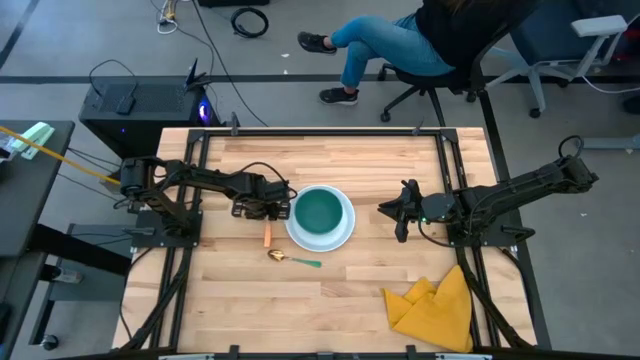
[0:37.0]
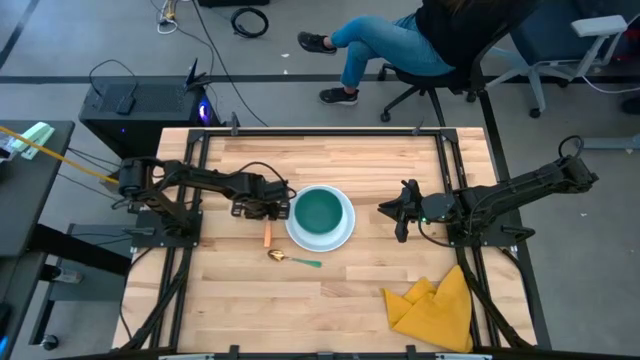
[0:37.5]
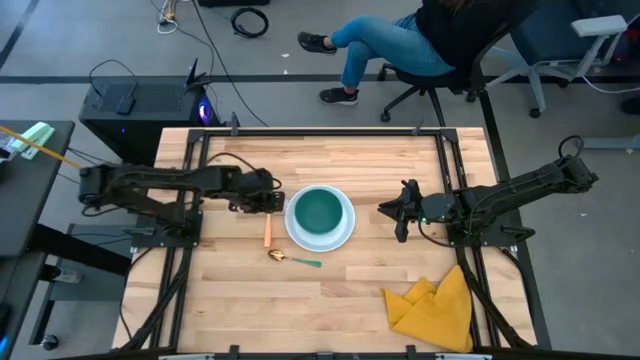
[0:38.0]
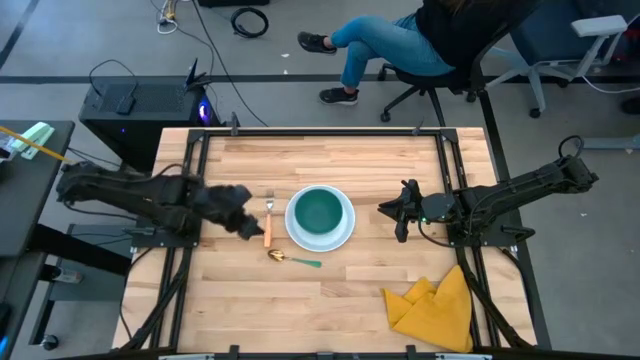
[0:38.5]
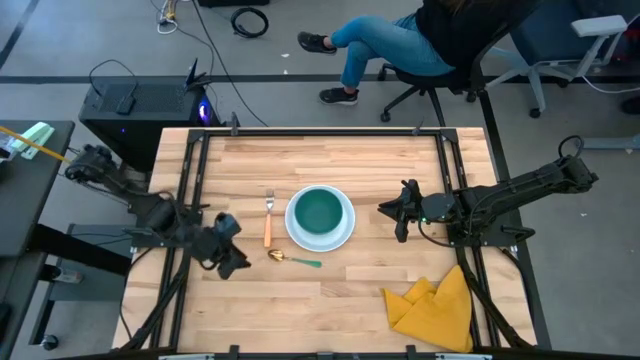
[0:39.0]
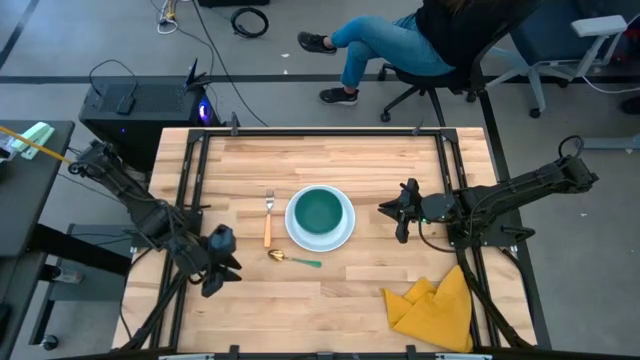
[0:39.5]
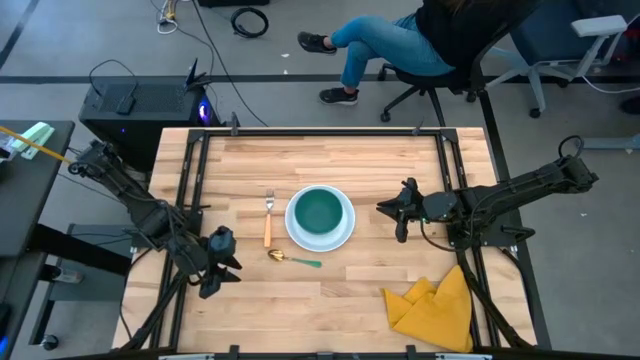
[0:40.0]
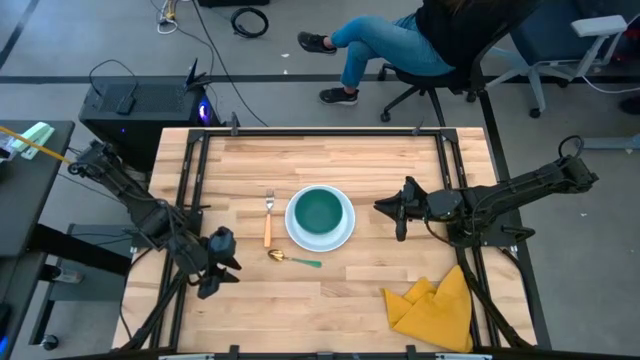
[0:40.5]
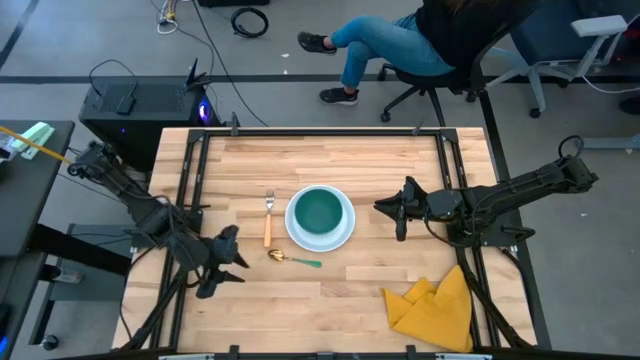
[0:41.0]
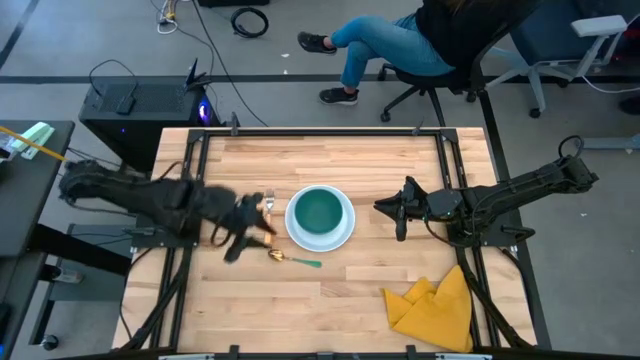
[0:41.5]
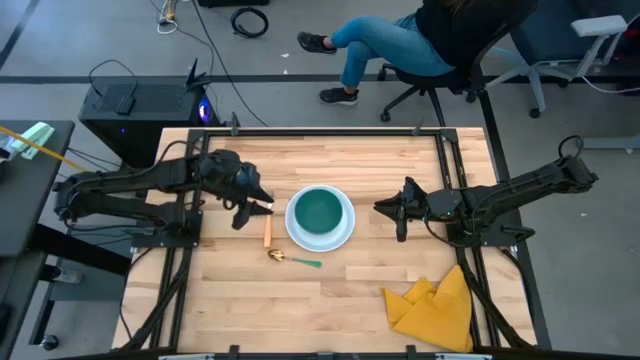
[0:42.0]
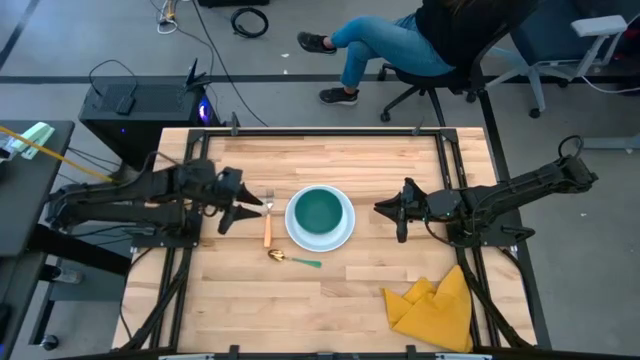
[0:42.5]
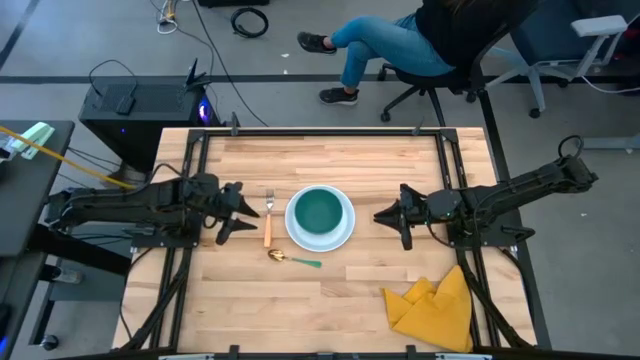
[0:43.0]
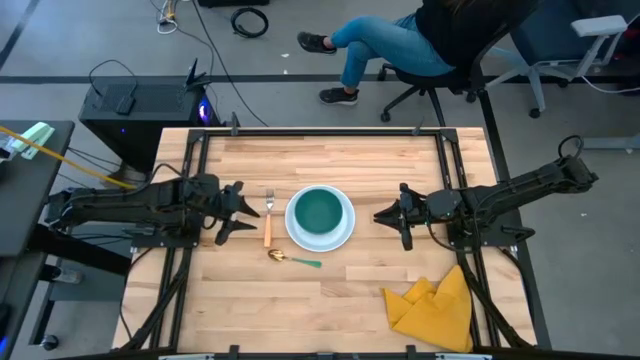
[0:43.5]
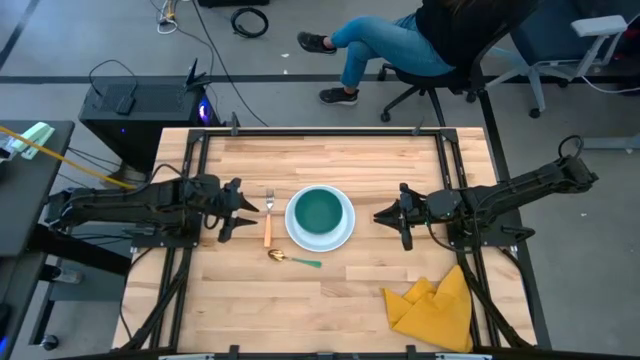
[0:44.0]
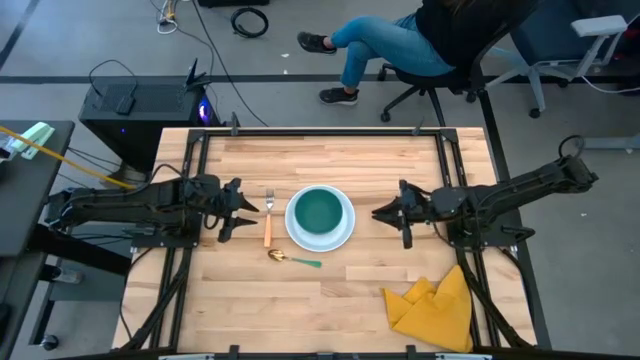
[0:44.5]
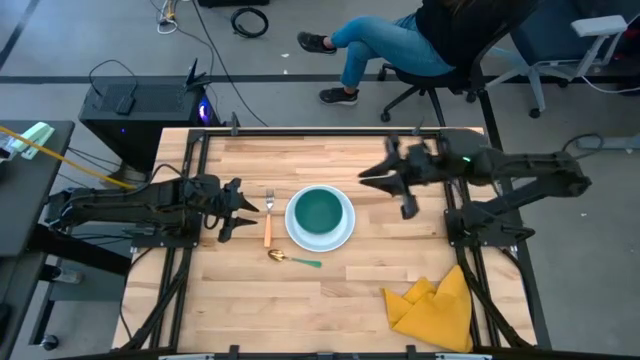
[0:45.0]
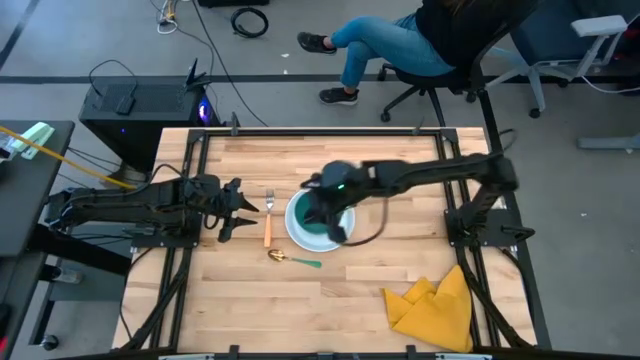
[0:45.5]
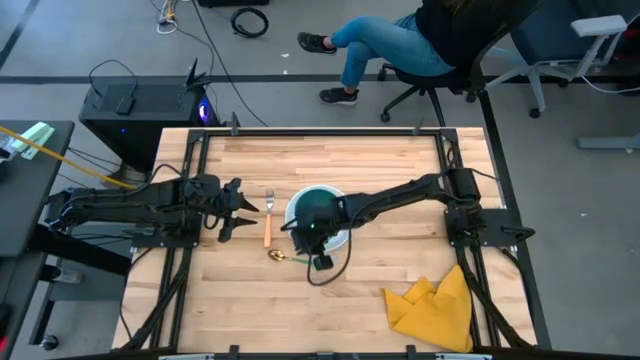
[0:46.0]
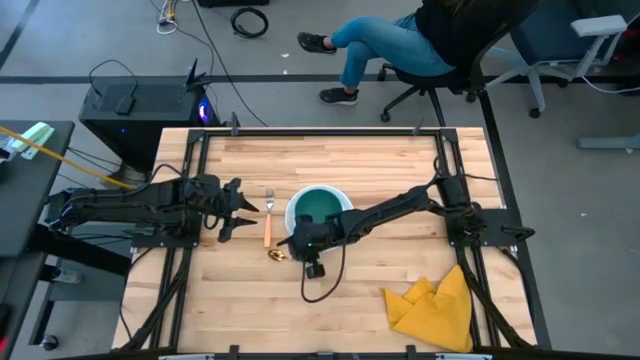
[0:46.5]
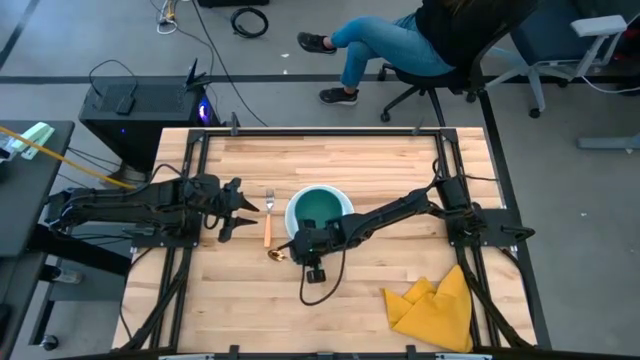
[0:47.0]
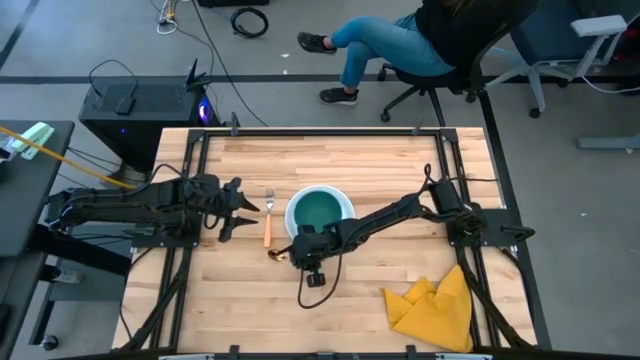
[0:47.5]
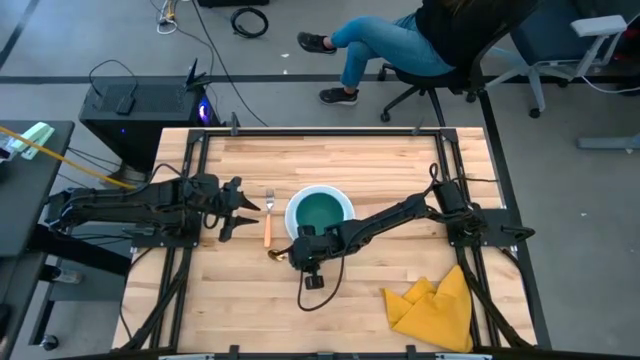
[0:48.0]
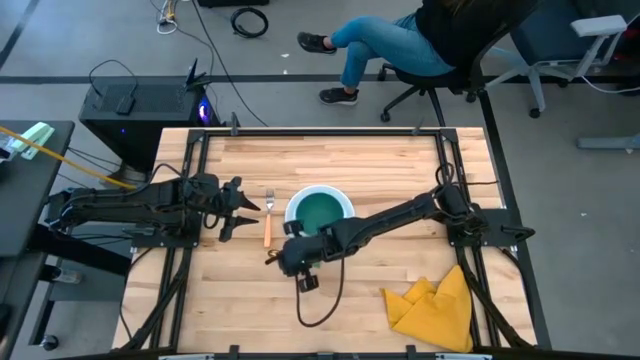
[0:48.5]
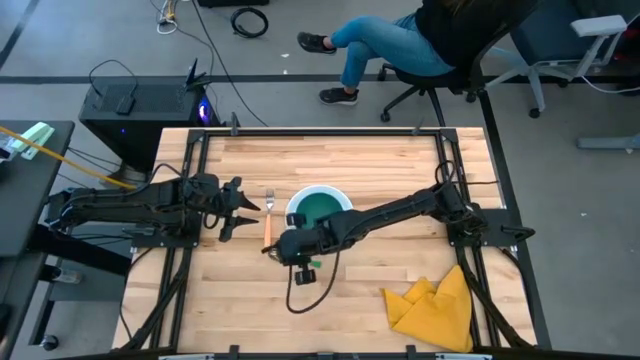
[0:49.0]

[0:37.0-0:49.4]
Task: Set table place
Put the green spoon into the green bowl
